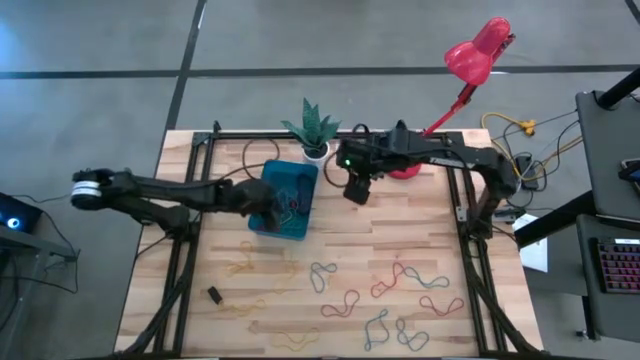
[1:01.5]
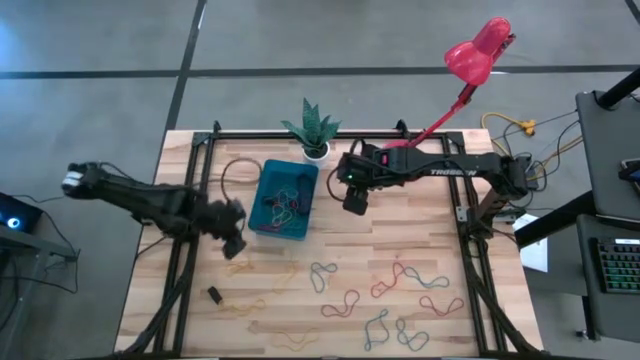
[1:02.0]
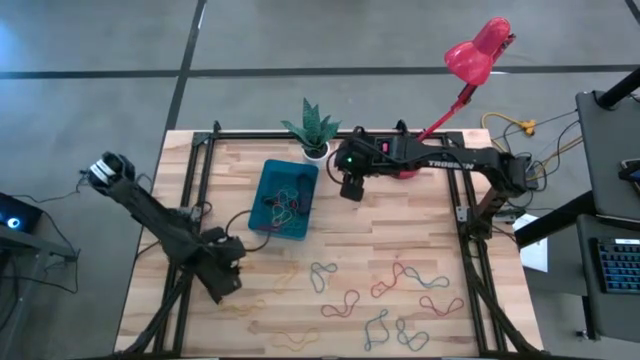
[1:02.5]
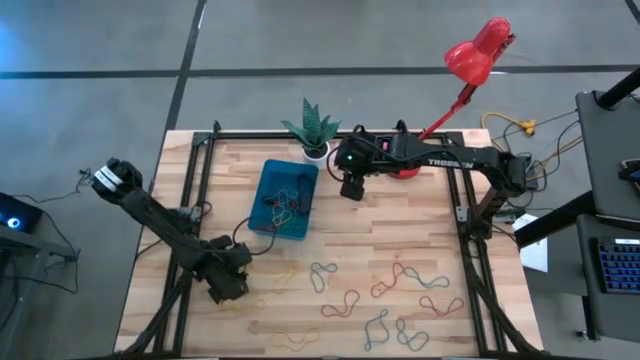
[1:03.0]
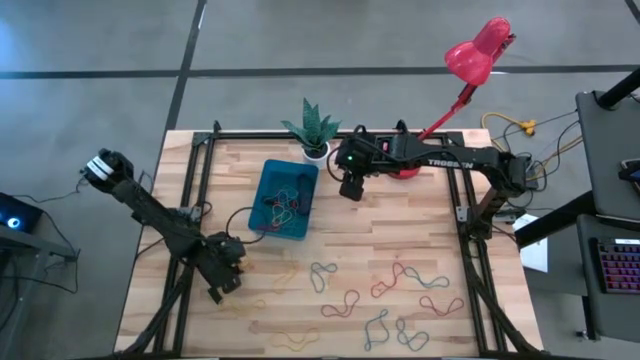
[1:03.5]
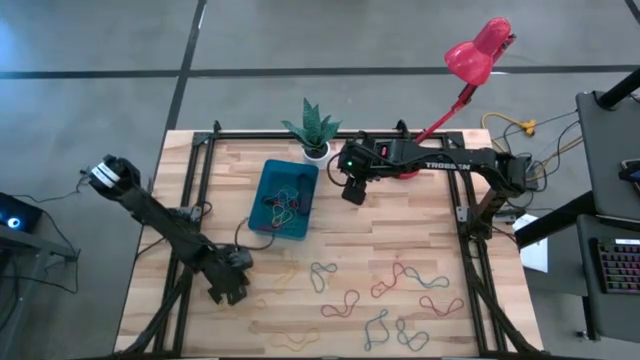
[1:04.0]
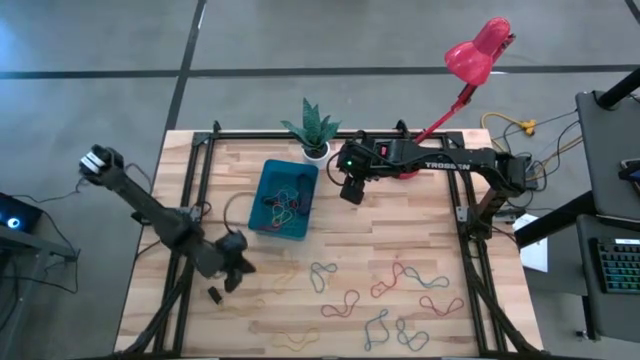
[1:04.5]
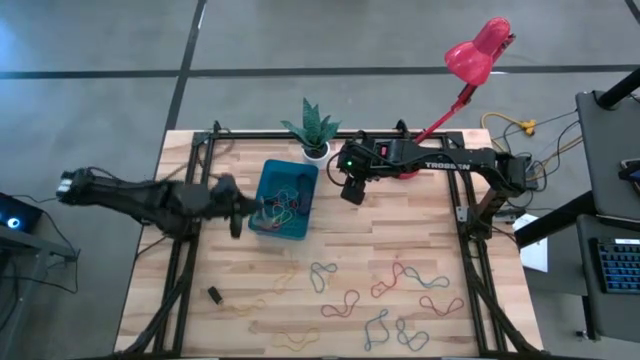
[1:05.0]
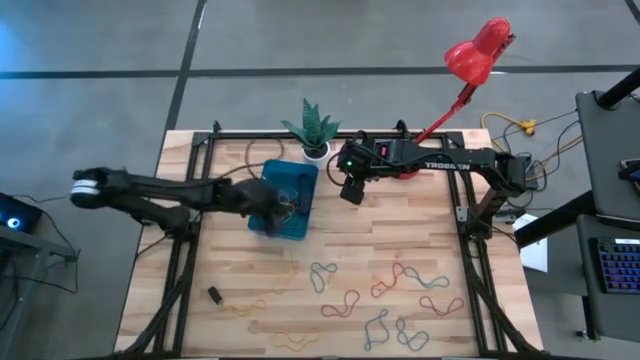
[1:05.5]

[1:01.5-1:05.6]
Task: Pick and place rubber bands into bin
Put the yellow rubber band into the blue bin

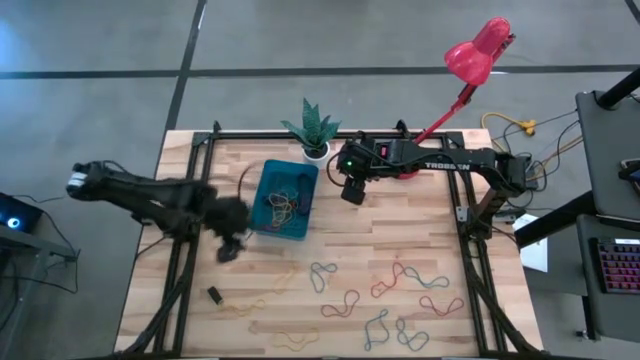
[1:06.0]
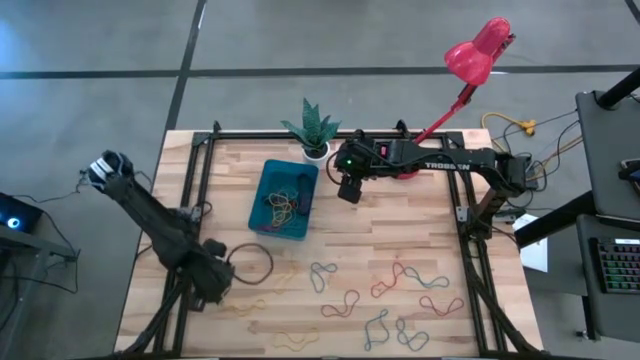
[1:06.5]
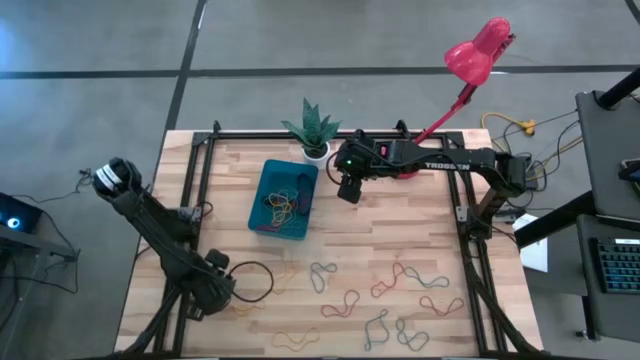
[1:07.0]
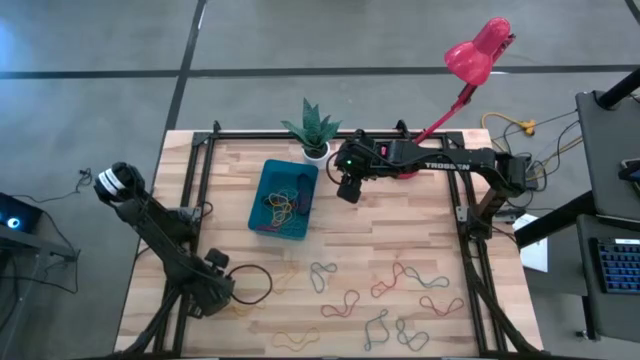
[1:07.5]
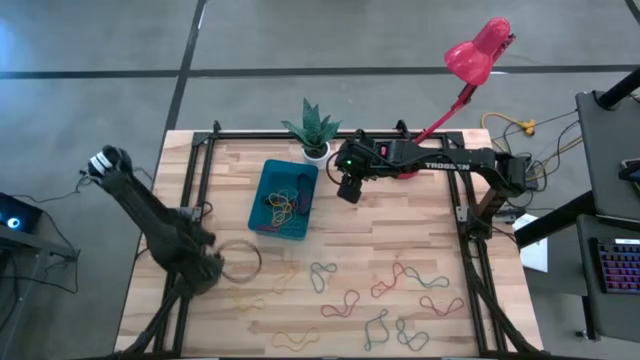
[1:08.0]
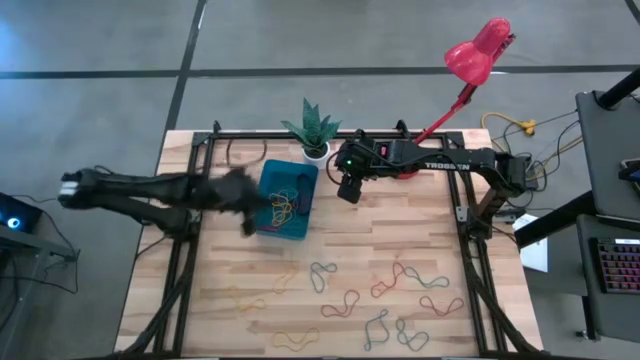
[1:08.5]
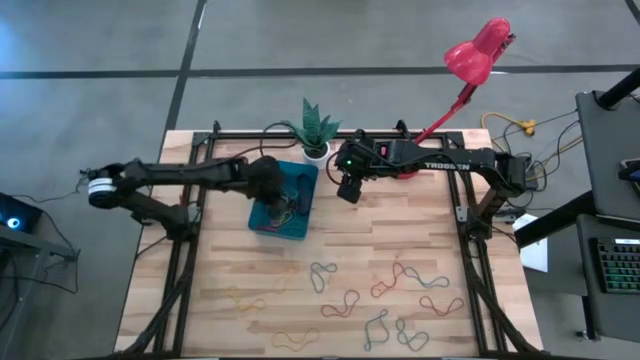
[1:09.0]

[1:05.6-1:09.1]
Put the black rubber band into the blue bin

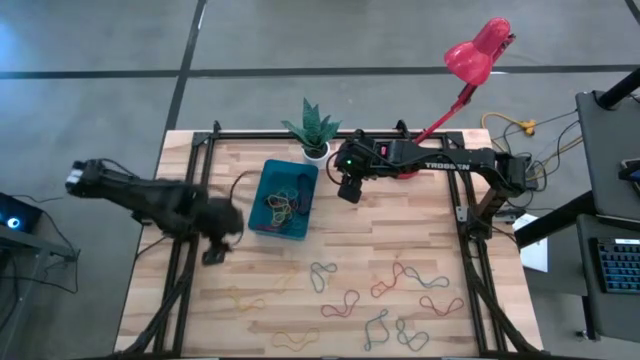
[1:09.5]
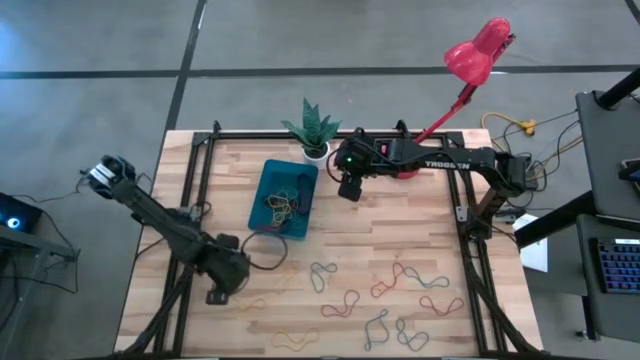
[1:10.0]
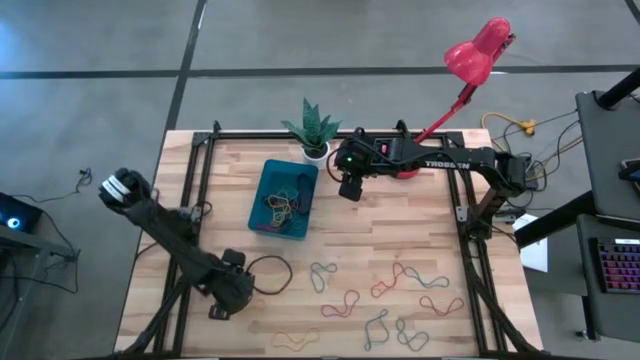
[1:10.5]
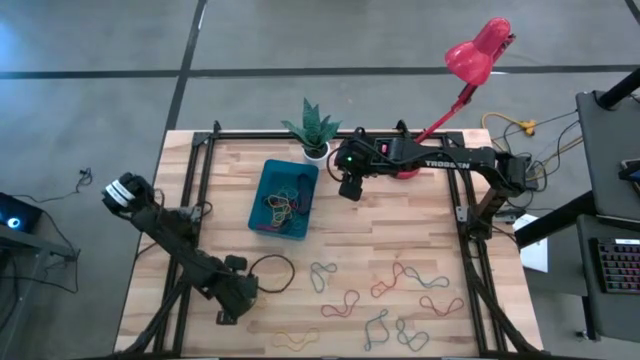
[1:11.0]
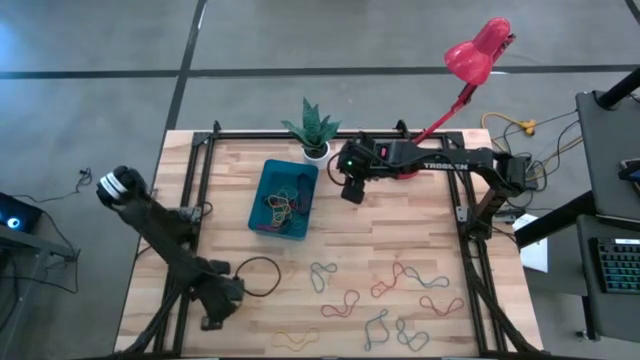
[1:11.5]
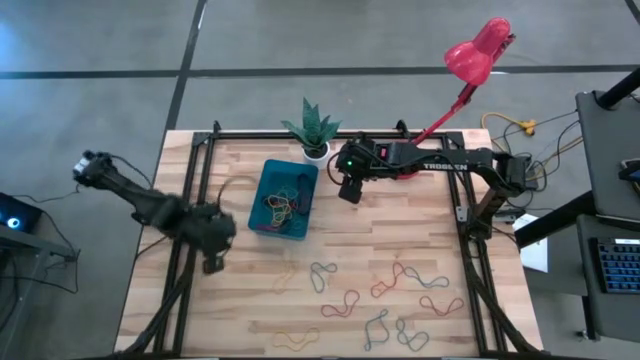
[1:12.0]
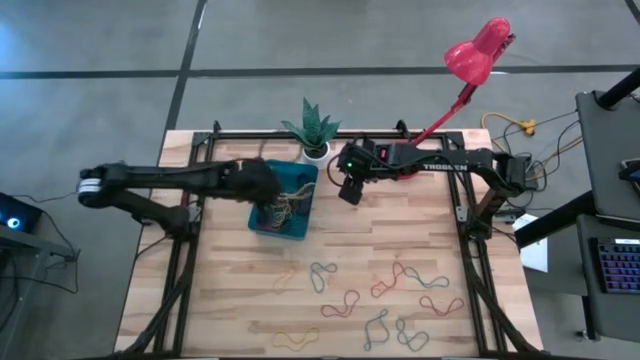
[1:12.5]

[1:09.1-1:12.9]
Put the yellow rubber band into the blue bin

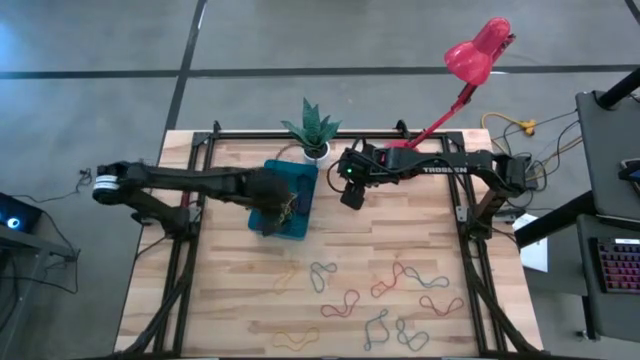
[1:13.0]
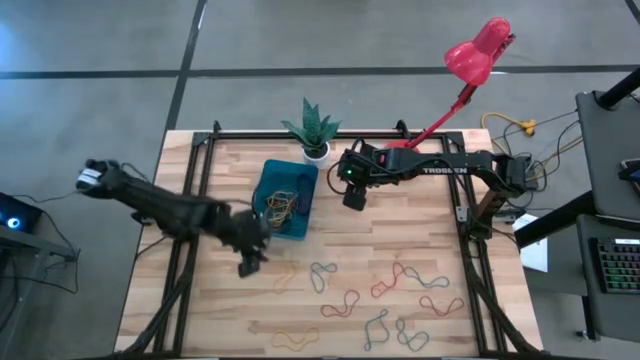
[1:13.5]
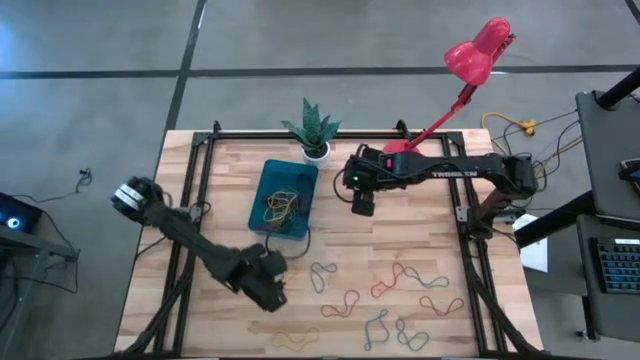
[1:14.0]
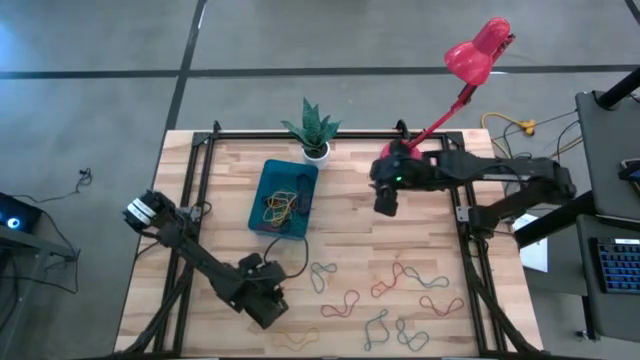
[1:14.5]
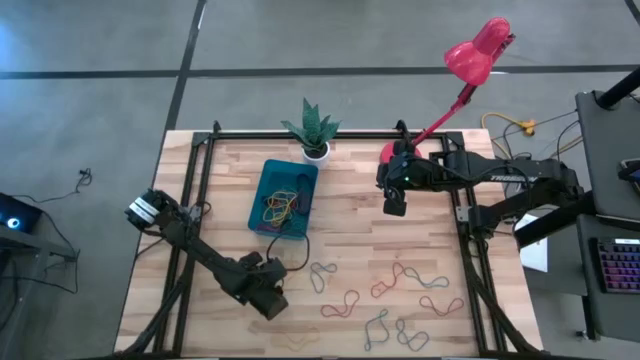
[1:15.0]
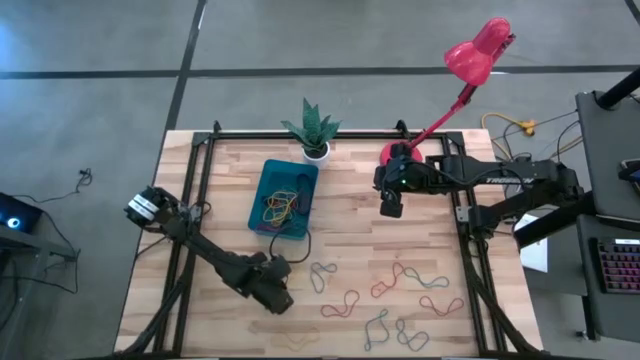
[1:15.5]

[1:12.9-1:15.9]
Put the yellow rubber band into the blue bin

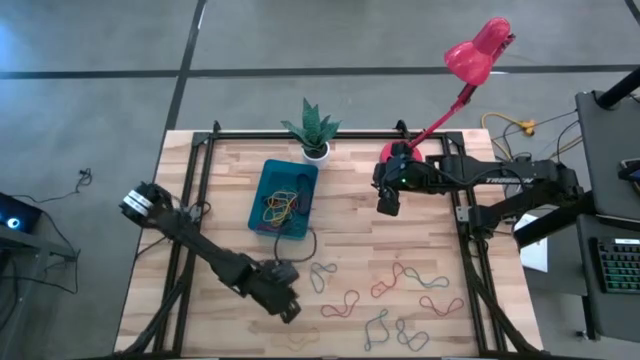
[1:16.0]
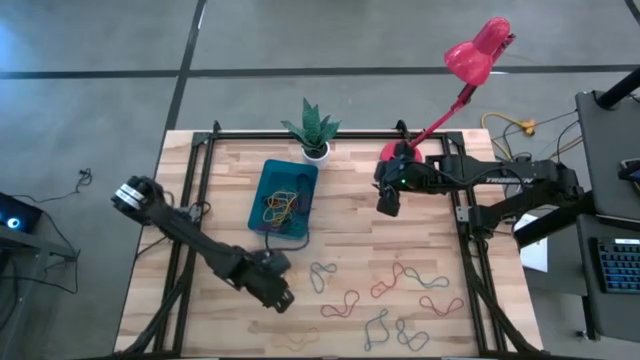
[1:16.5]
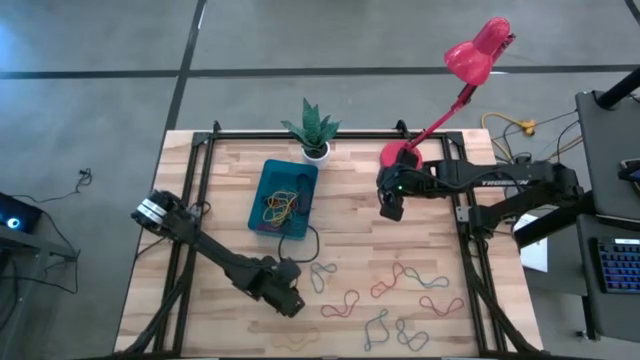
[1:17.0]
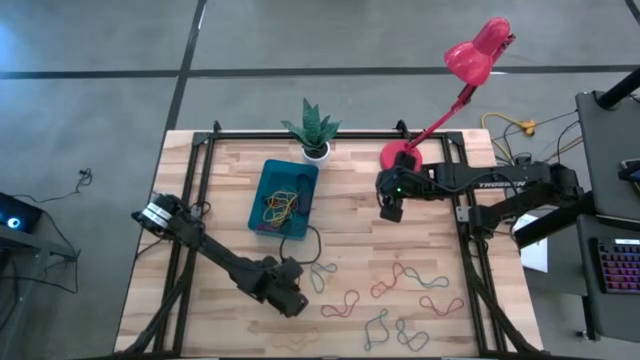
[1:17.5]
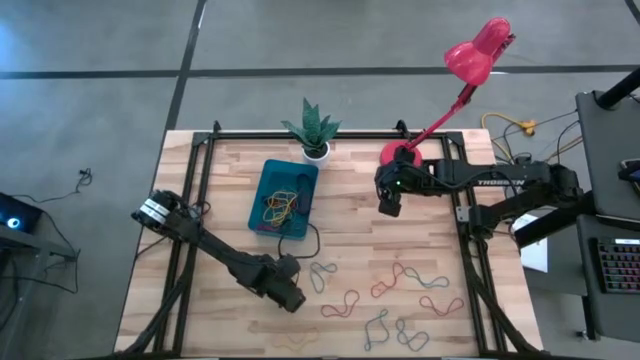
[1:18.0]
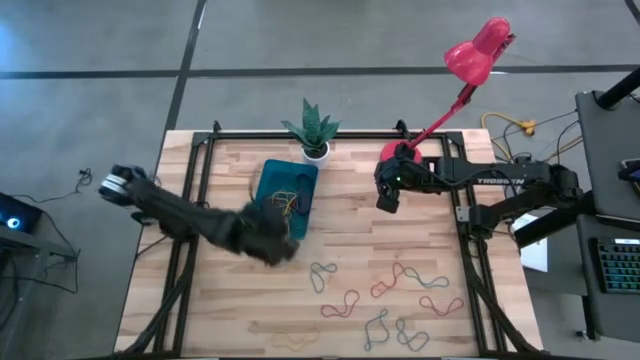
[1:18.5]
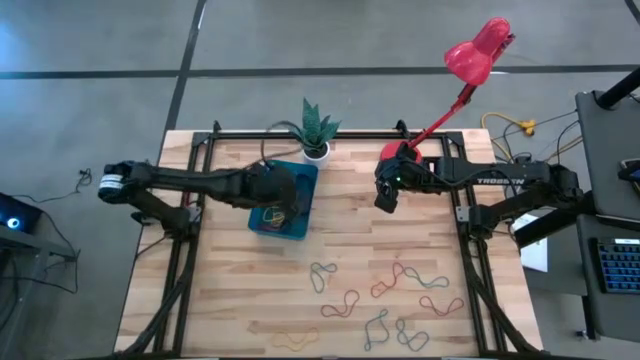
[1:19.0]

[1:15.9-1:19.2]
Put the yellow rubber band into the blue bin

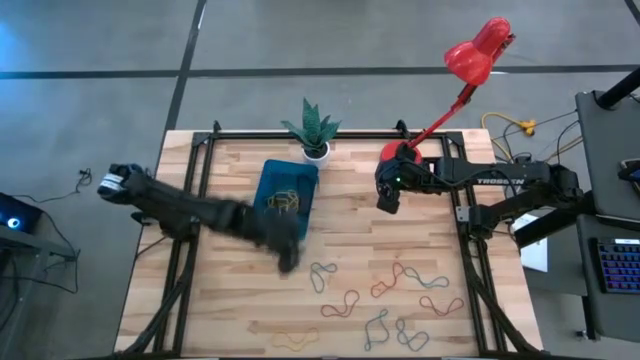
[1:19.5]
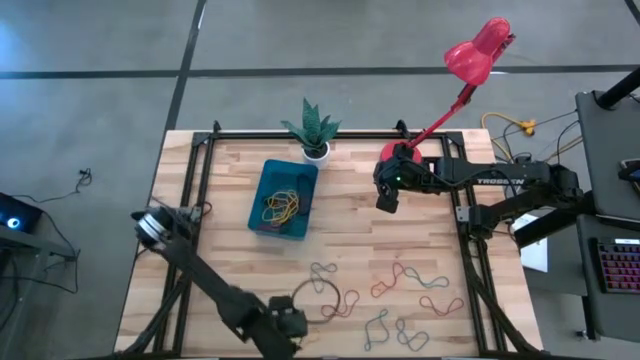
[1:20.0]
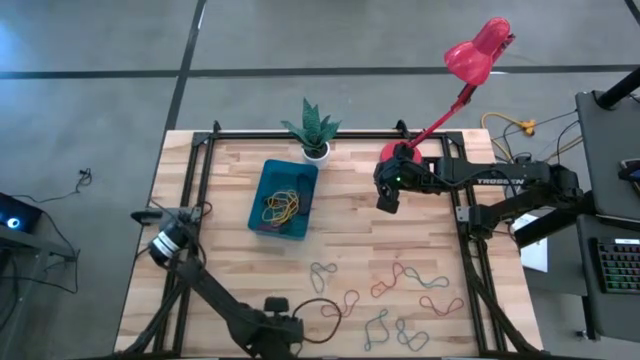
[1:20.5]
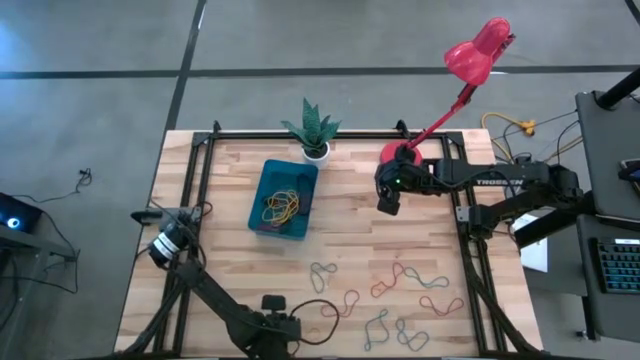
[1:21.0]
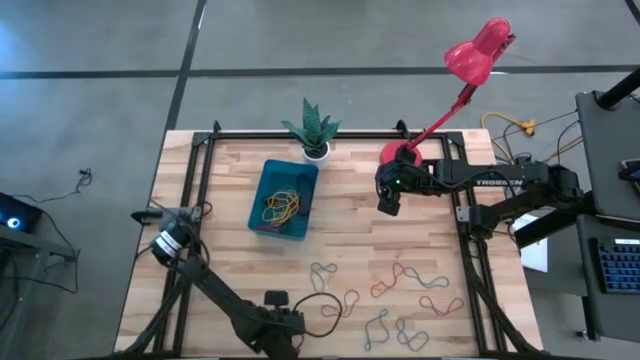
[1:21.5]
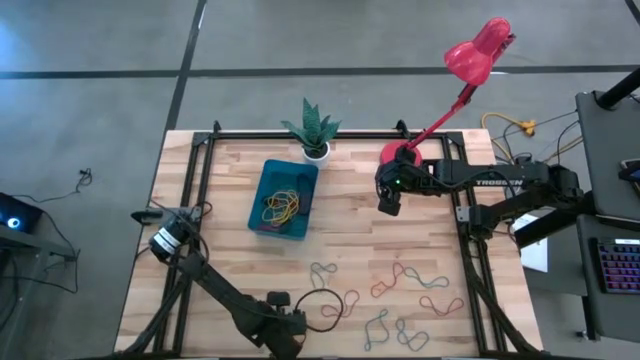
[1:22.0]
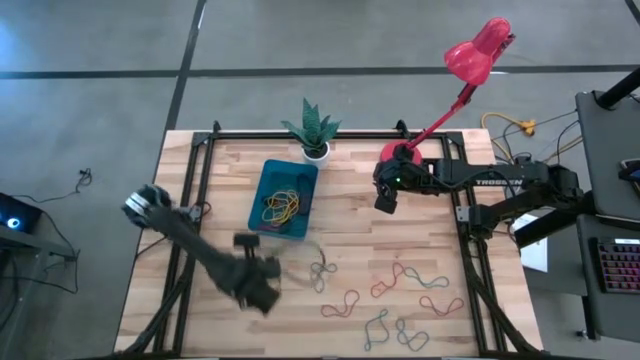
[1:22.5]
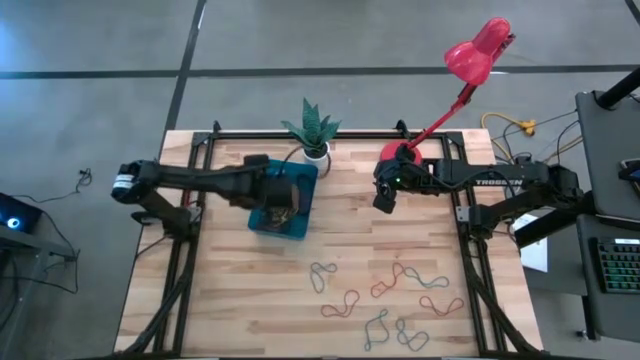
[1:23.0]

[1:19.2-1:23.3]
Put the yellow rubber band into the blue bin
